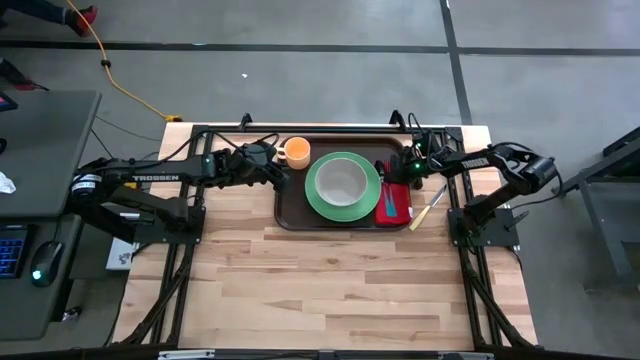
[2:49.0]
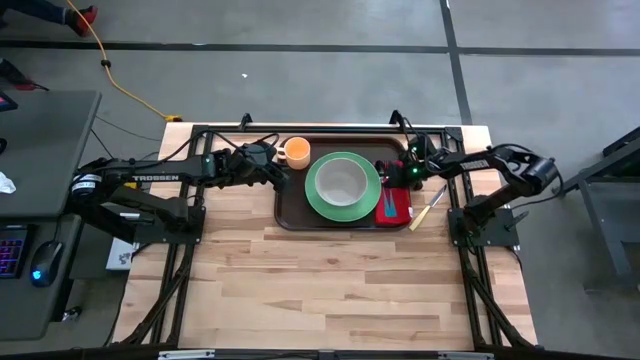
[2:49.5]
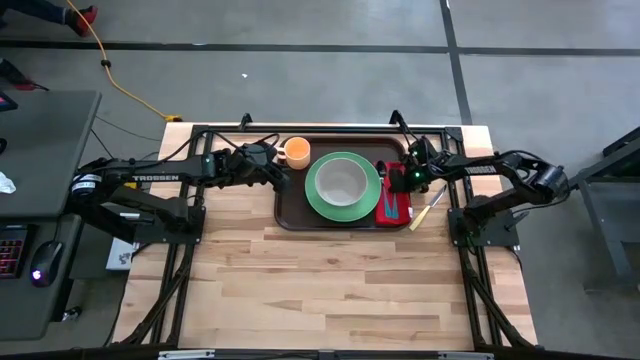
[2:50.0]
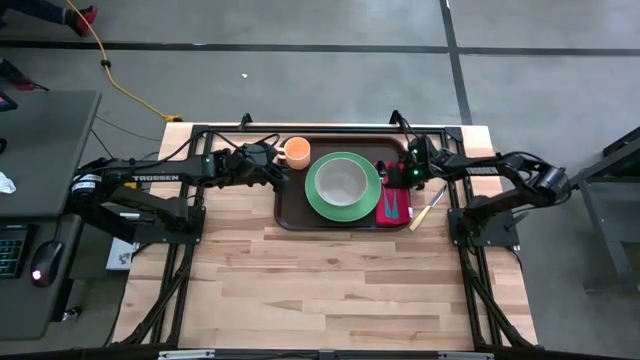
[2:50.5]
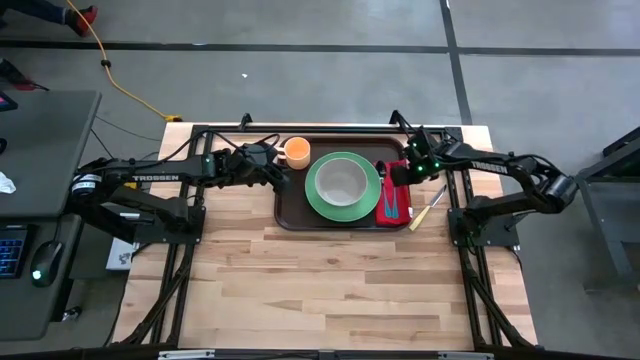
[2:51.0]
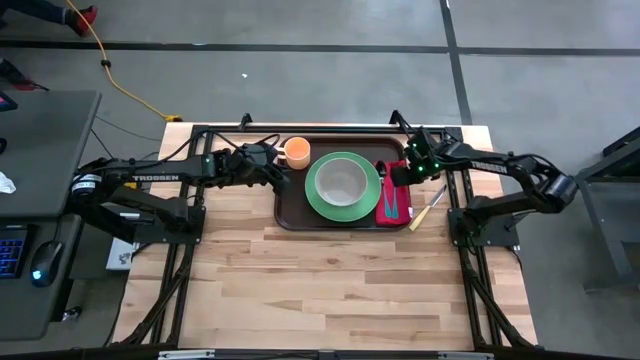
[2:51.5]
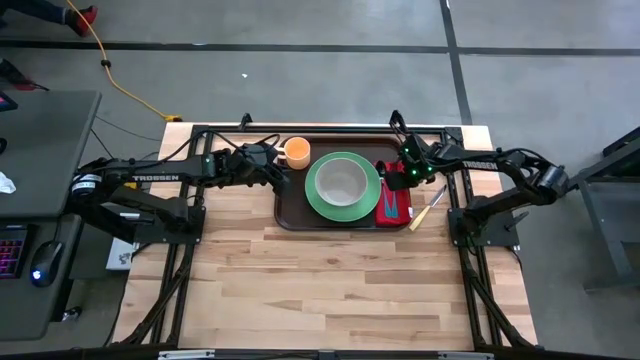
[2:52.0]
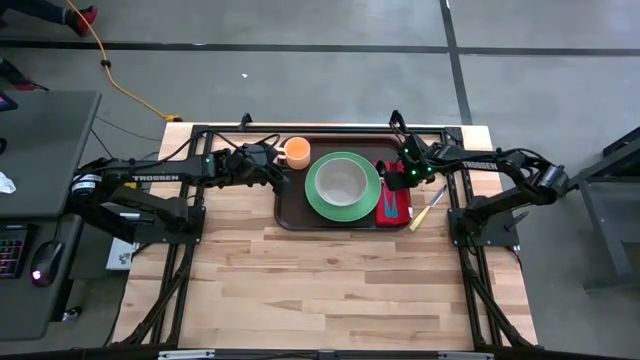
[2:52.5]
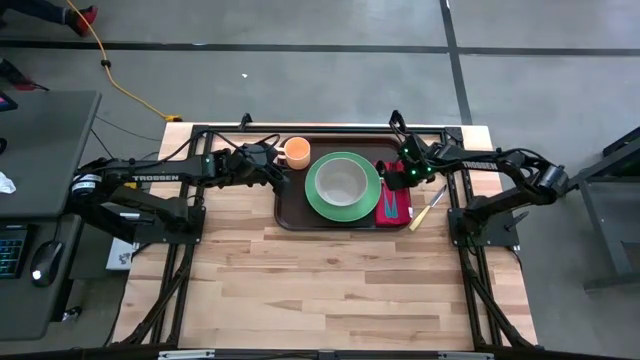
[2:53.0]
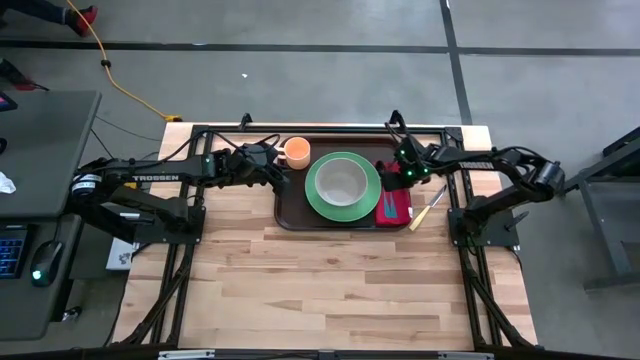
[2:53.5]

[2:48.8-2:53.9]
Task: Set up tray
Adjust the blue fork on top of the red table napkin on the brown tray

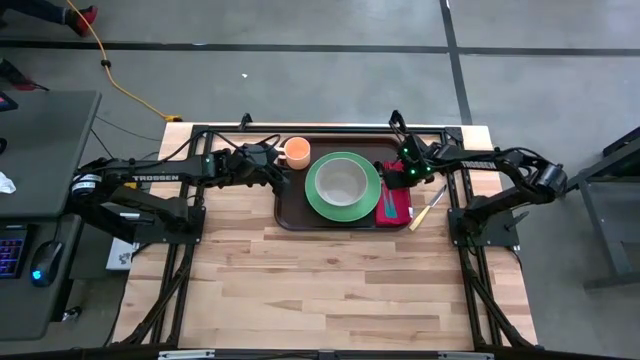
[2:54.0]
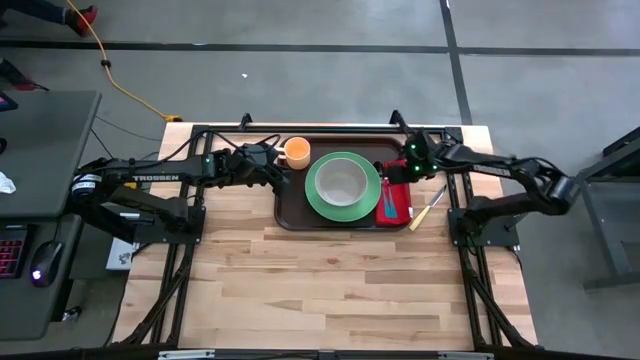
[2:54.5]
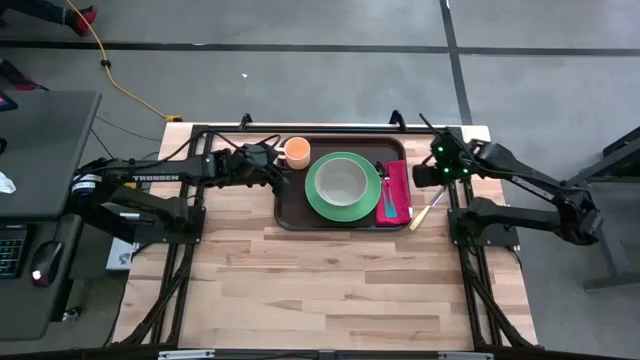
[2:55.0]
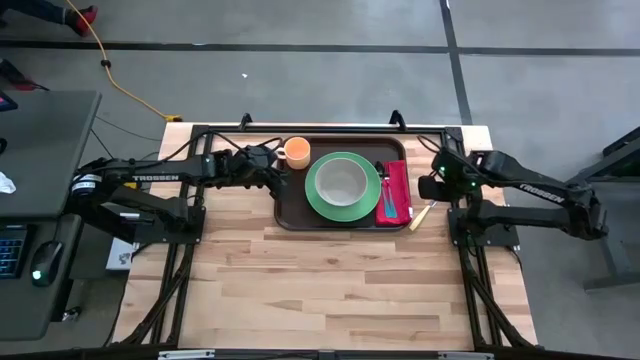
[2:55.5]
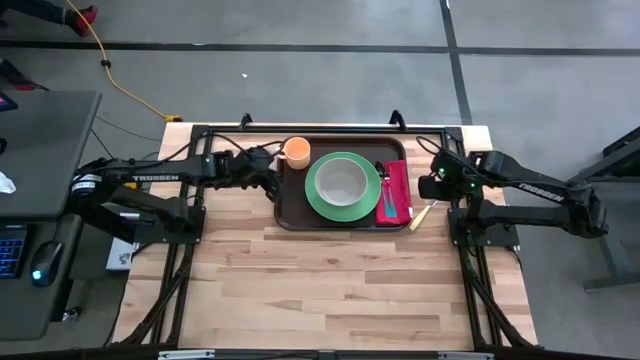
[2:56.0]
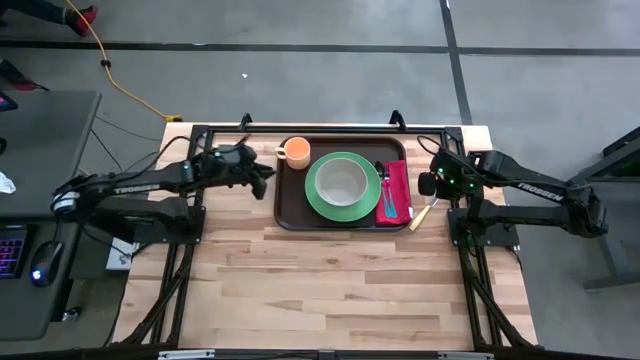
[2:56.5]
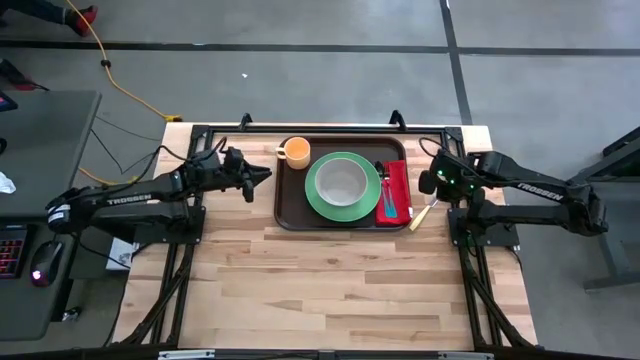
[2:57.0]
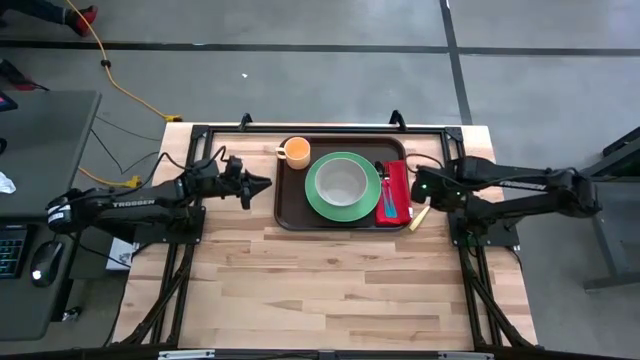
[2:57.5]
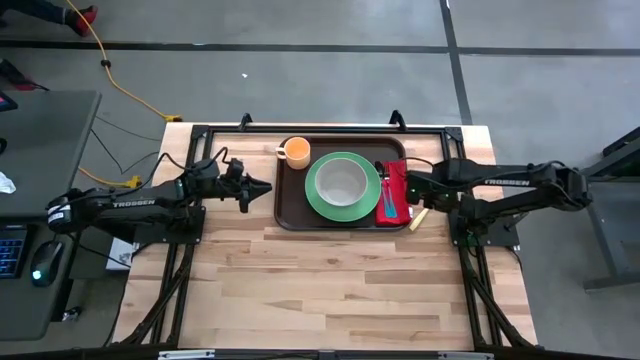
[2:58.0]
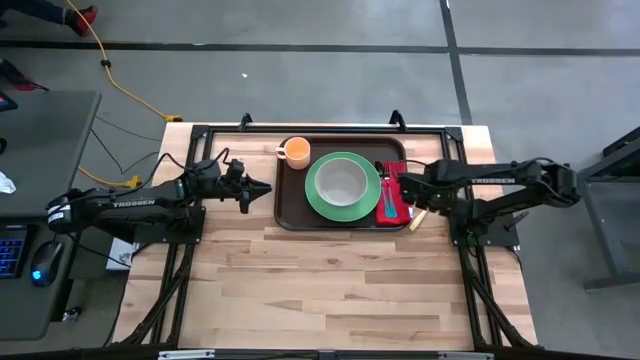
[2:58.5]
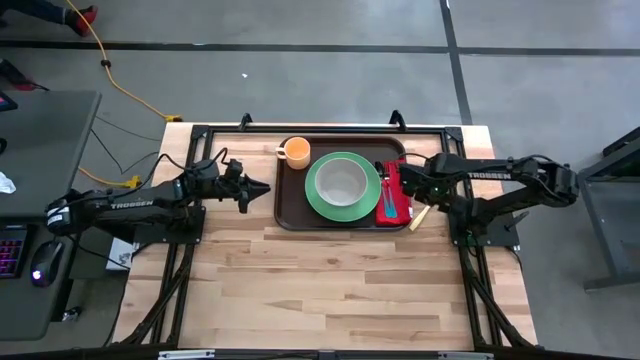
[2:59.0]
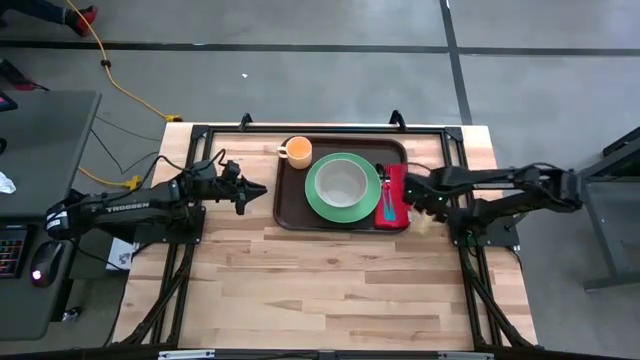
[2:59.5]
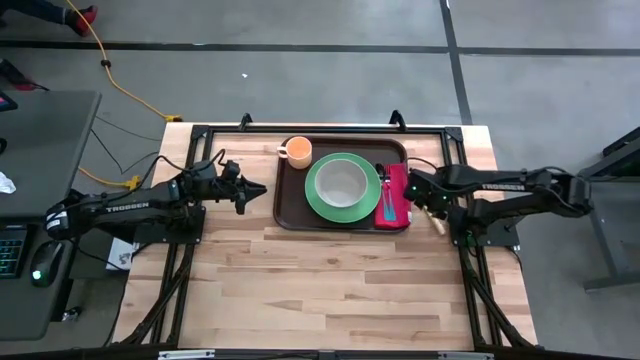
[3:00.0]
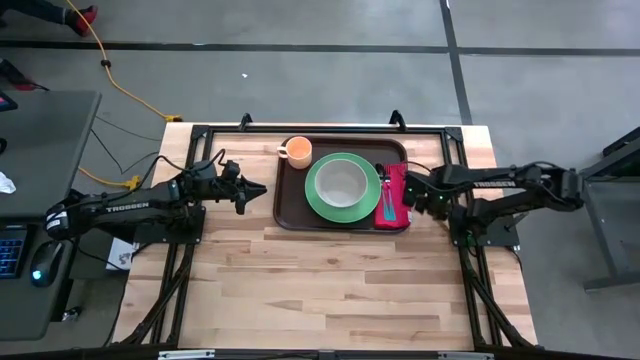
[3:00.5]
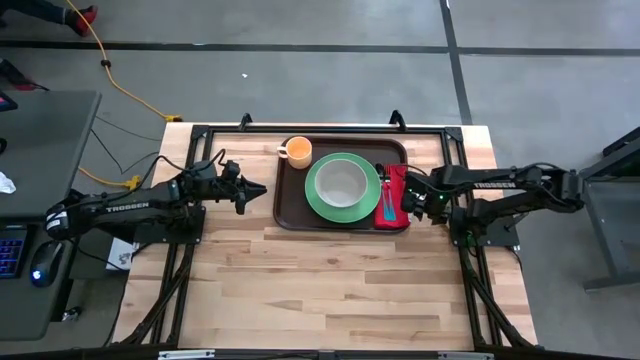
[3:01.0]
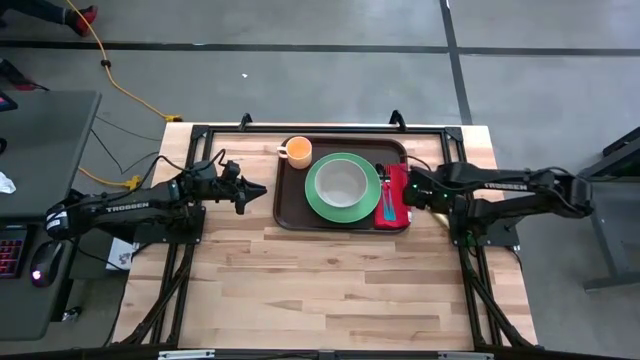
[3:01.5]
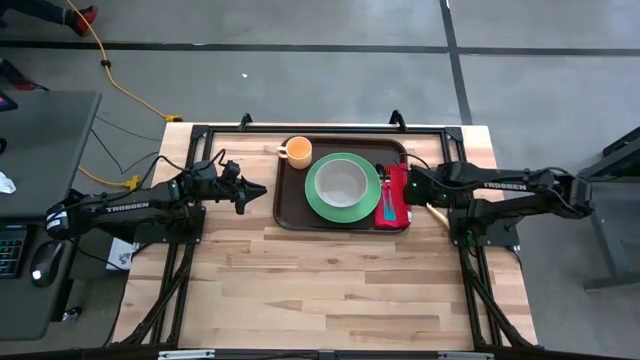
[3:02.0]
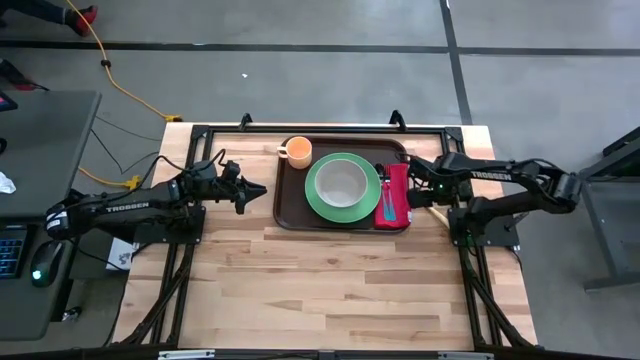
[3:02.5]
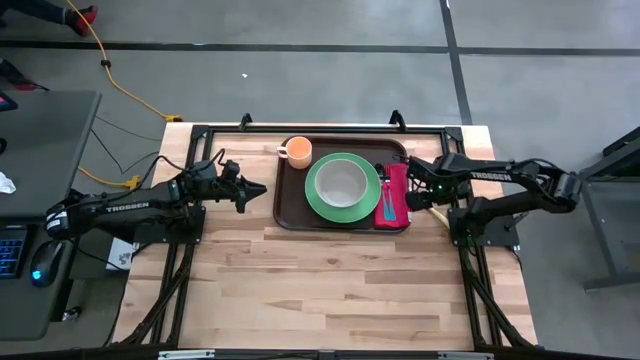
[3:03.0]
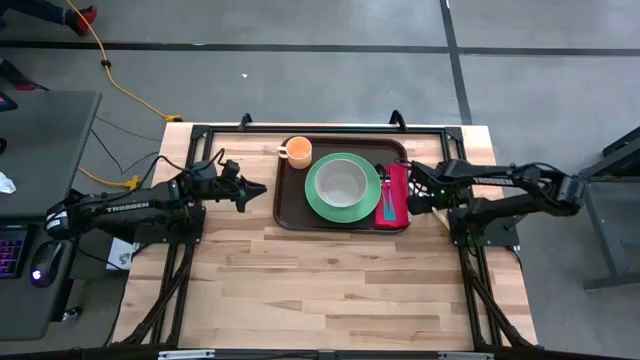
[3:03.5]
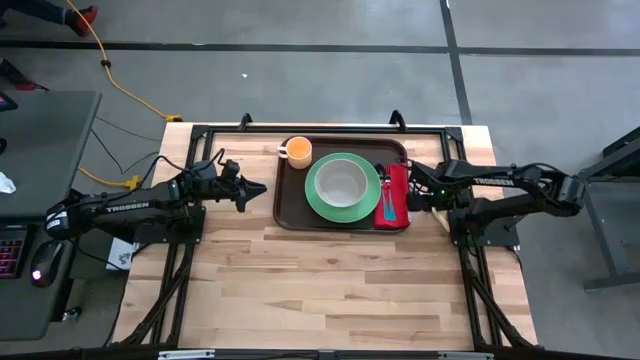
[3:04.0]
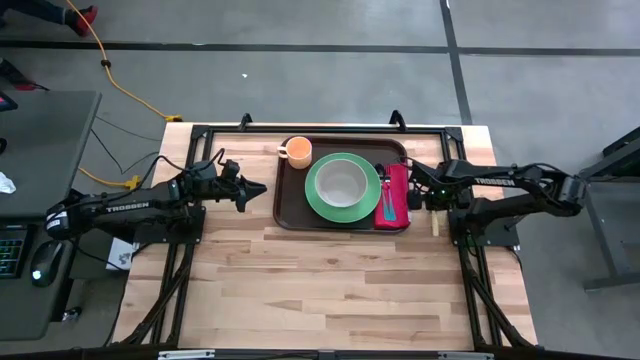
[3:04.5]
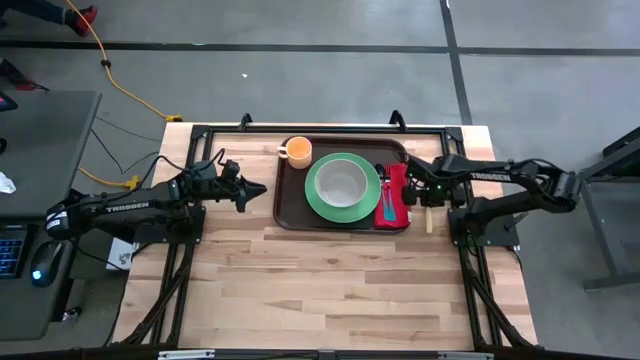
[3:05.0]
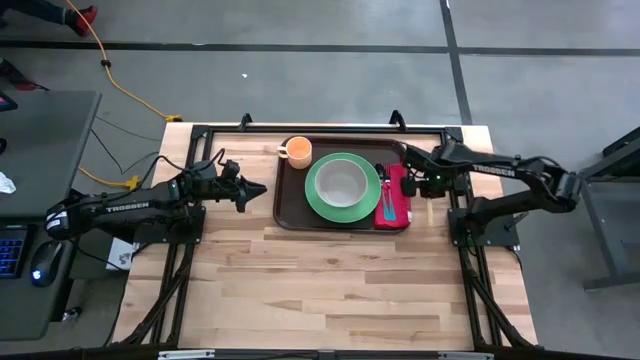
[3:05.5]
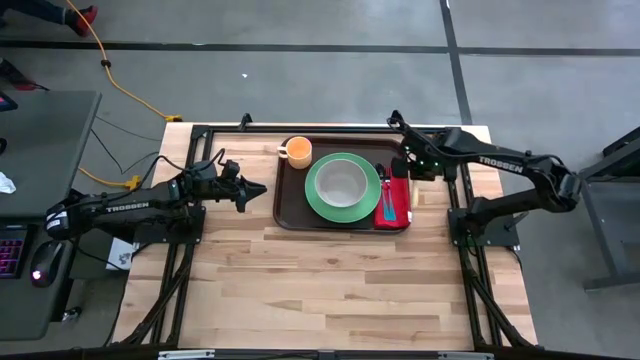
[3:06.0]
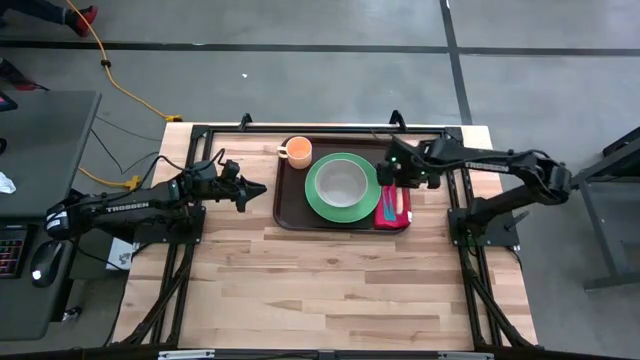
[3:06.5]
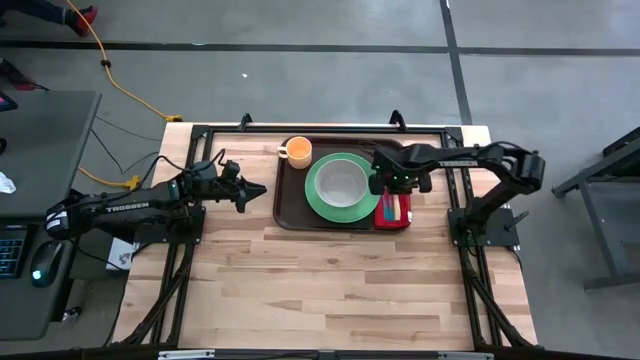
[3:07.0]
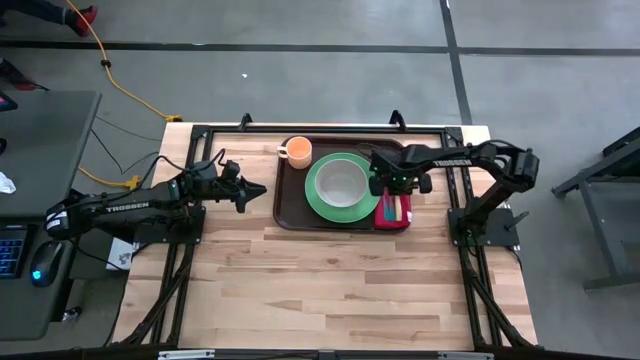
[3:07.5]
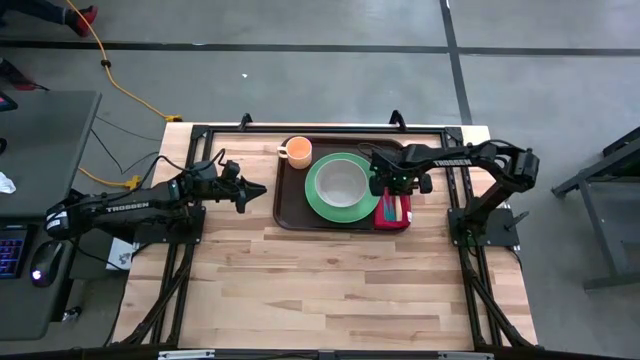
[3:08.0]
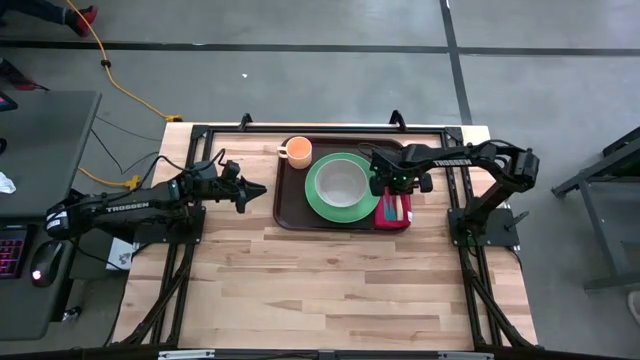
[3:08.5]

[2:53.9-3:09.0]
Put the yellow knife on top of the red table napkin to the right of the blue fork on the brown tray

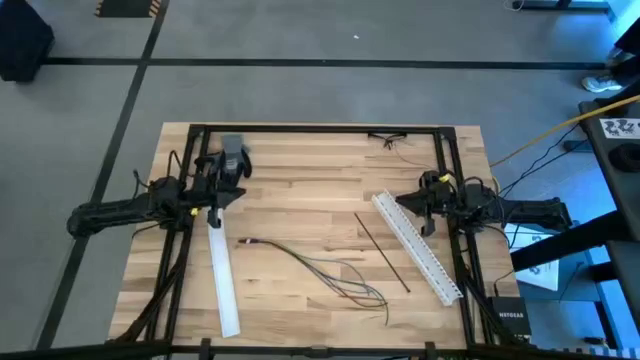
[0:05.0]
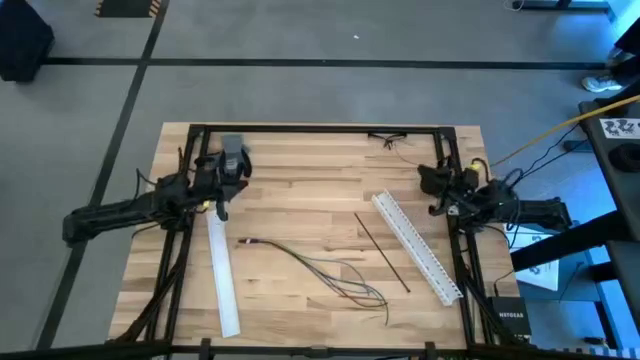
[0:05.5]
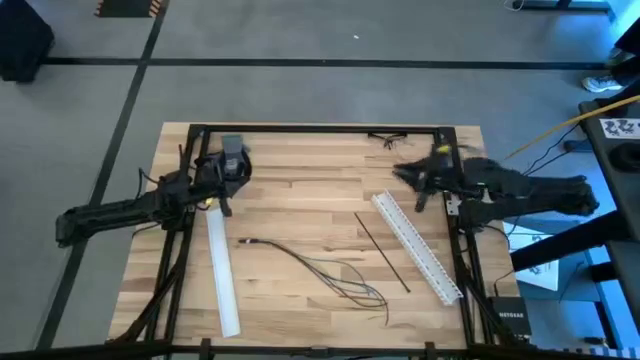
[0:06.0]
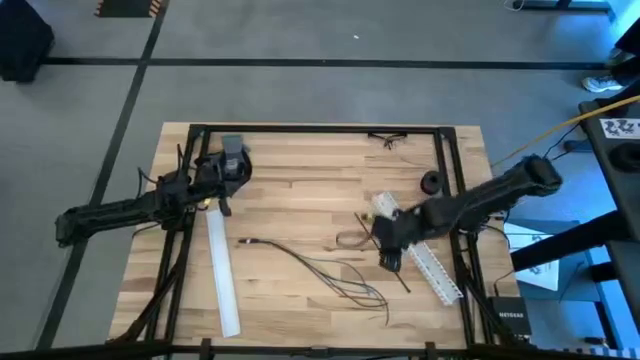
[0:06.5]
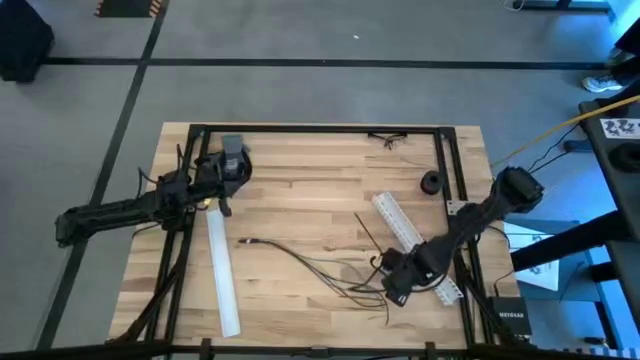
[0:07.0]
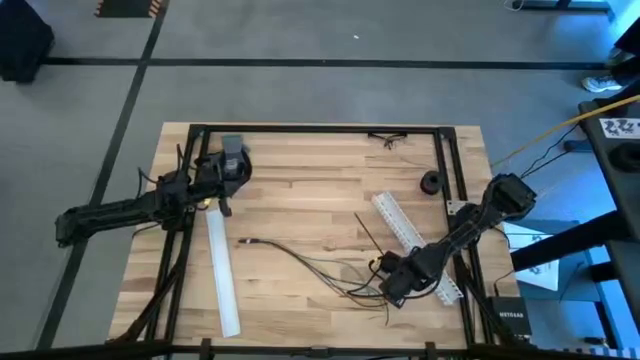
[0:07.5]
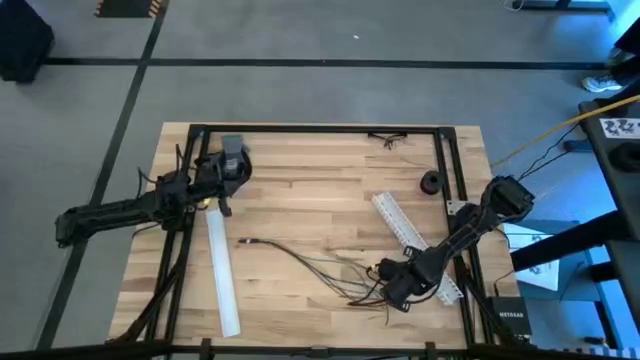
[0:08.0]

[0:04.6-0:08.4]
Task: Ziptie cables
Prepare the black ziptie
